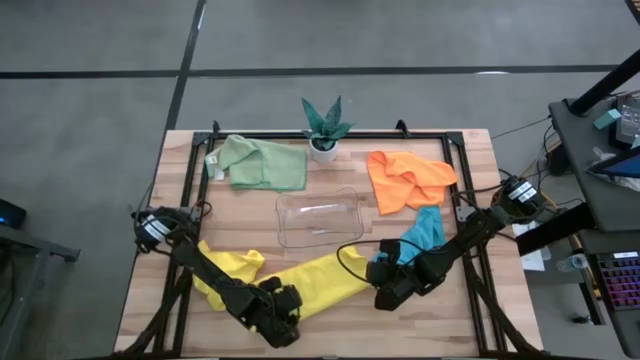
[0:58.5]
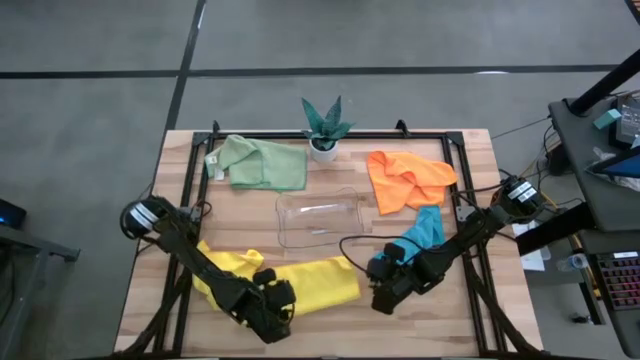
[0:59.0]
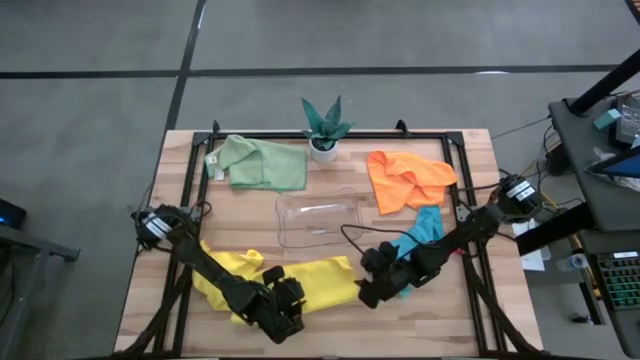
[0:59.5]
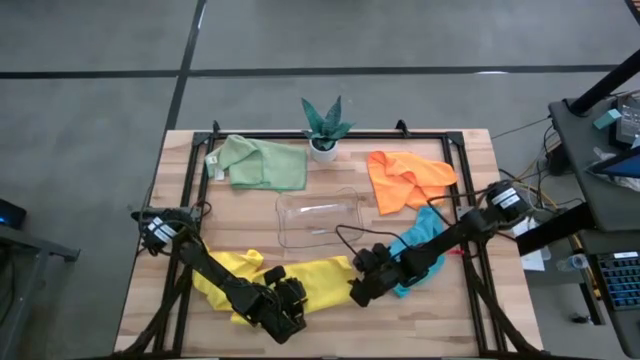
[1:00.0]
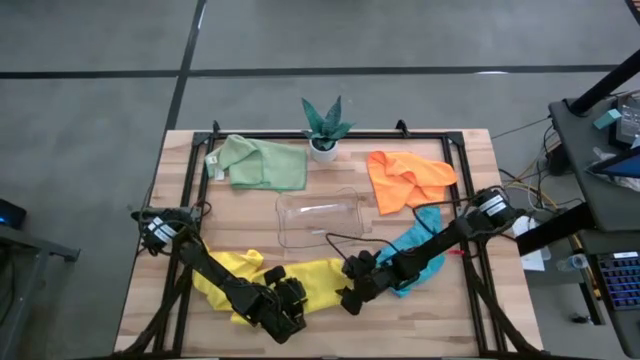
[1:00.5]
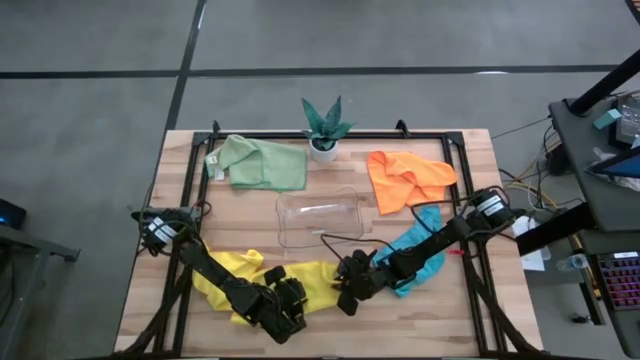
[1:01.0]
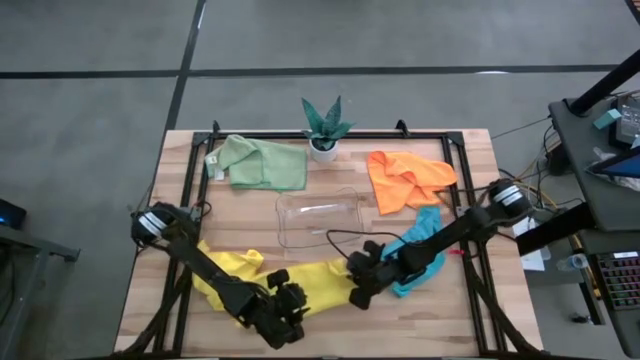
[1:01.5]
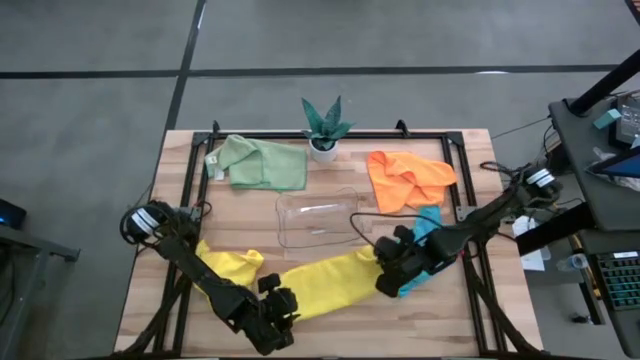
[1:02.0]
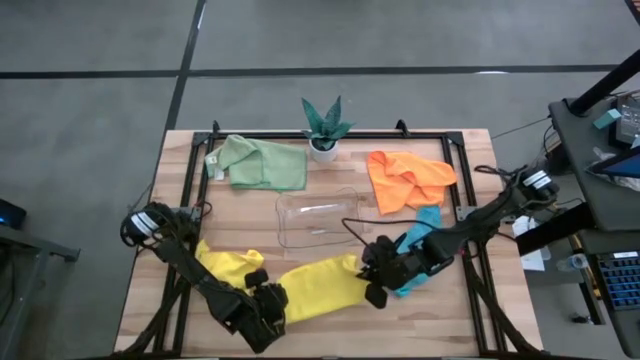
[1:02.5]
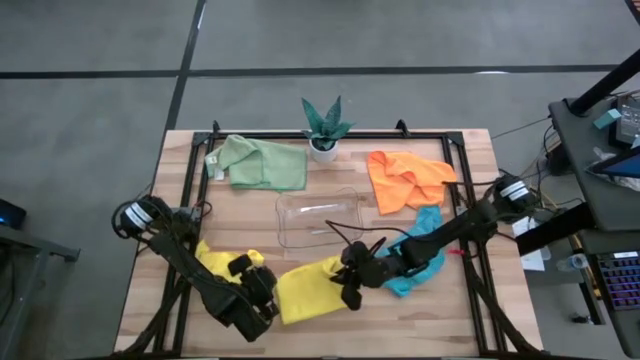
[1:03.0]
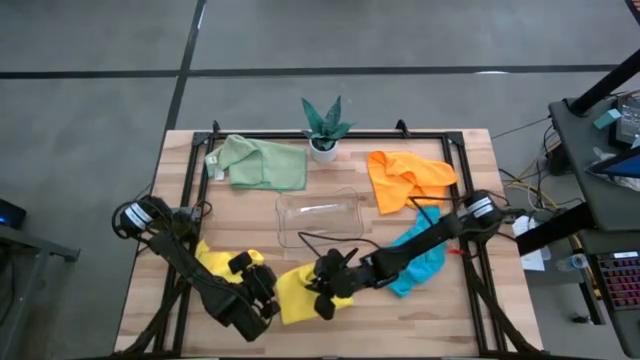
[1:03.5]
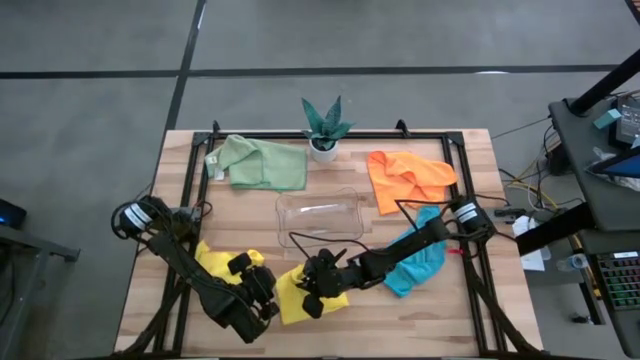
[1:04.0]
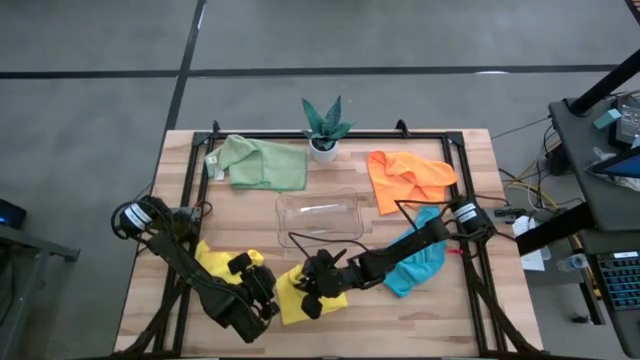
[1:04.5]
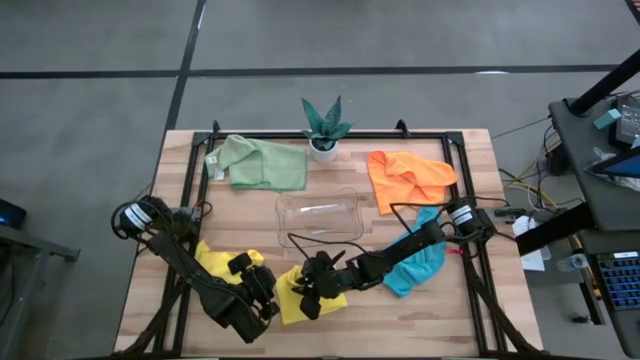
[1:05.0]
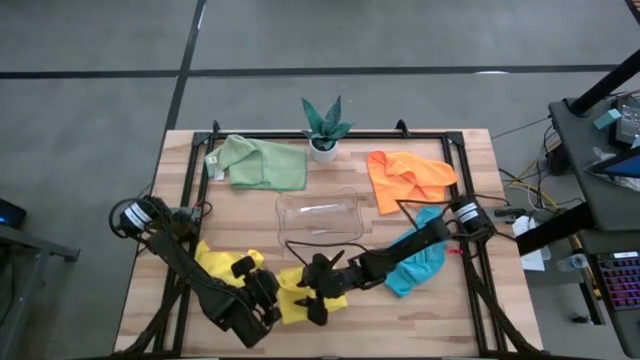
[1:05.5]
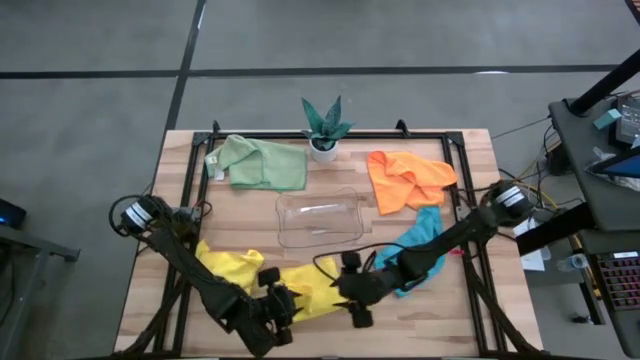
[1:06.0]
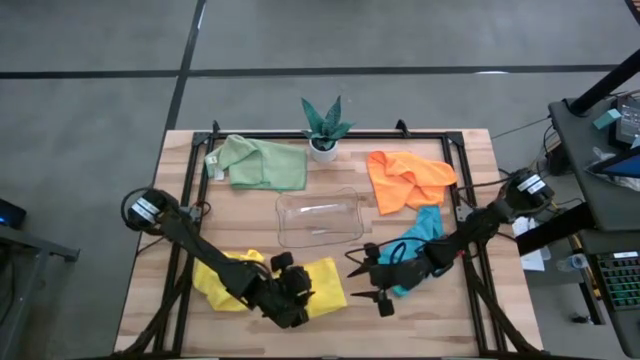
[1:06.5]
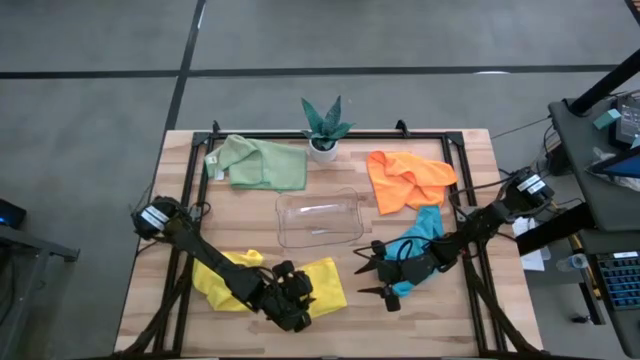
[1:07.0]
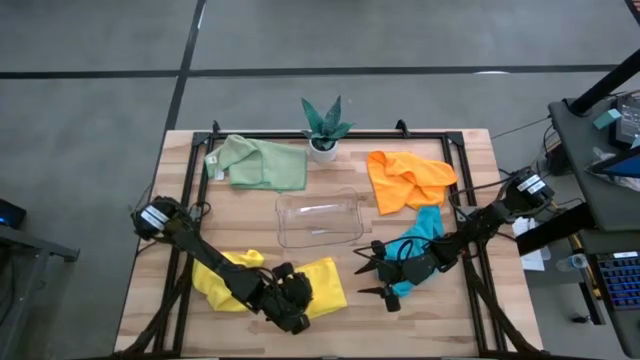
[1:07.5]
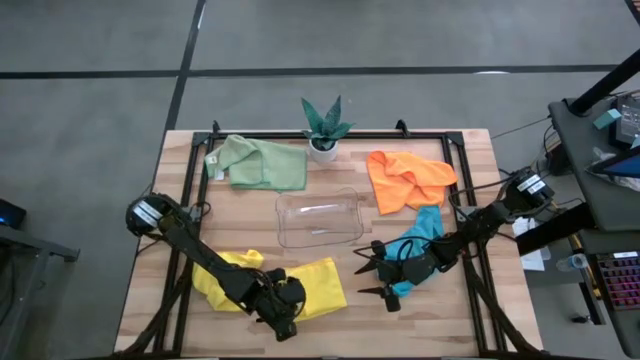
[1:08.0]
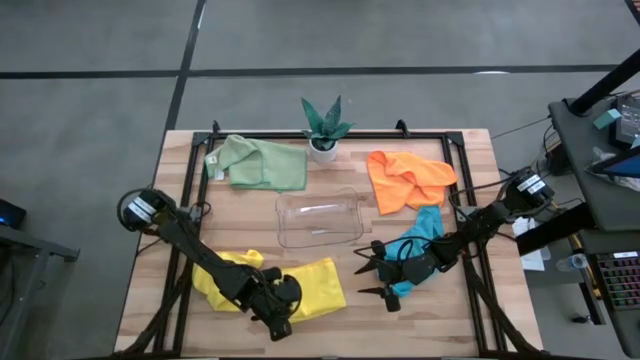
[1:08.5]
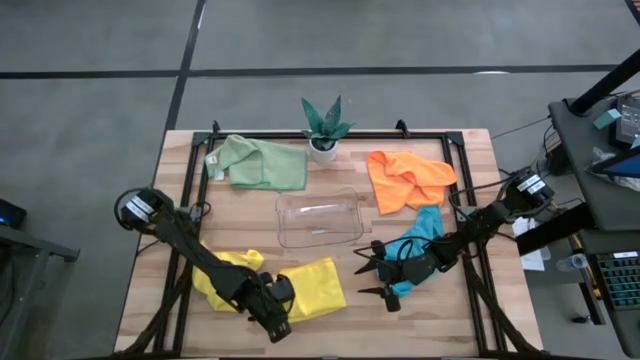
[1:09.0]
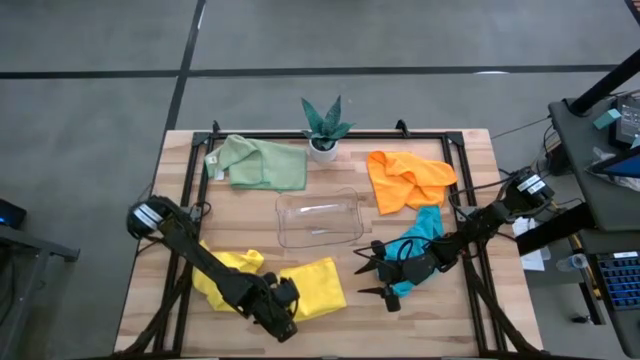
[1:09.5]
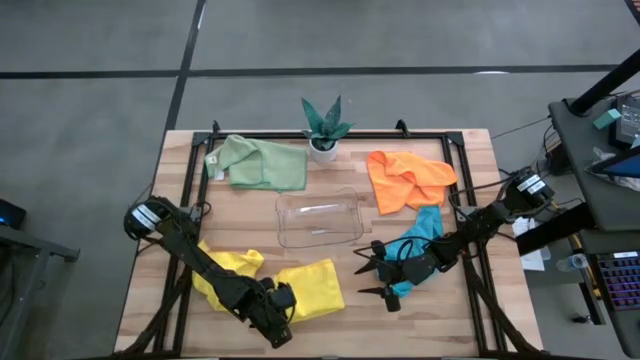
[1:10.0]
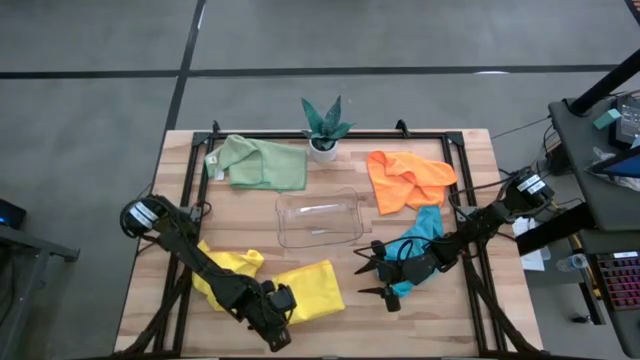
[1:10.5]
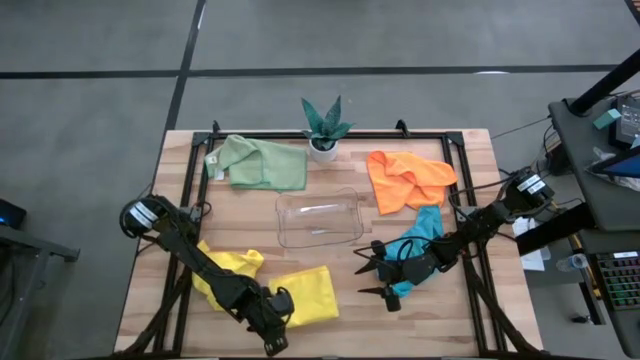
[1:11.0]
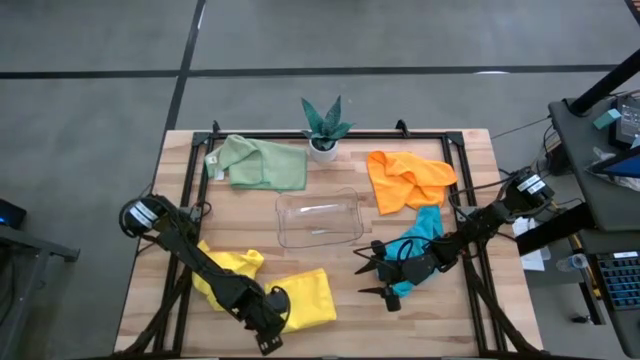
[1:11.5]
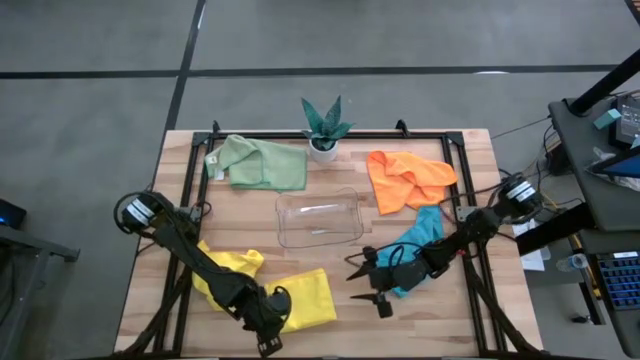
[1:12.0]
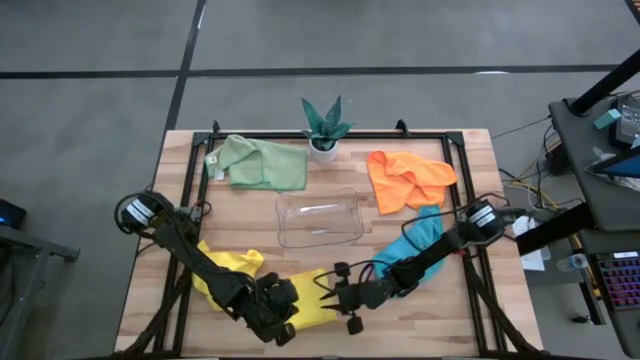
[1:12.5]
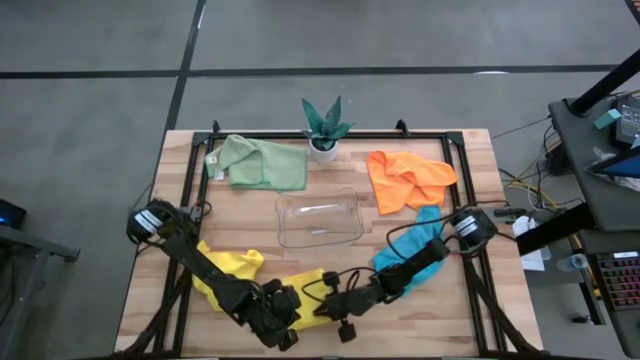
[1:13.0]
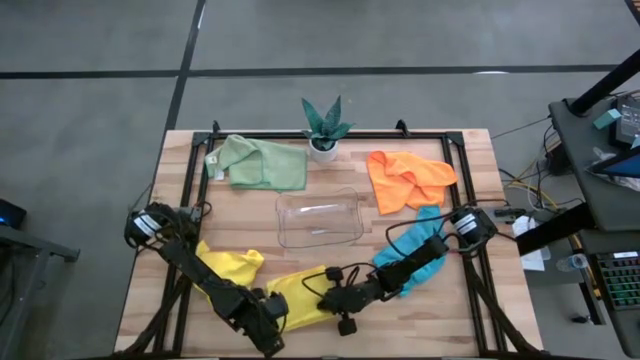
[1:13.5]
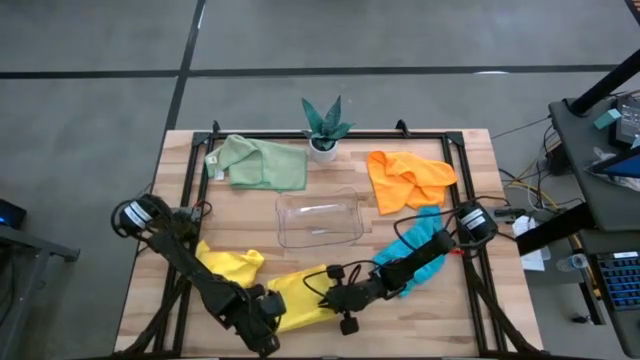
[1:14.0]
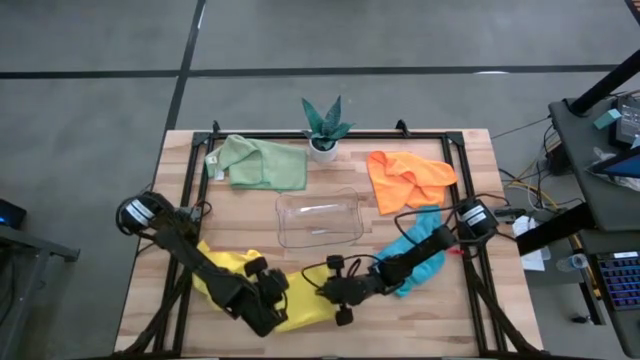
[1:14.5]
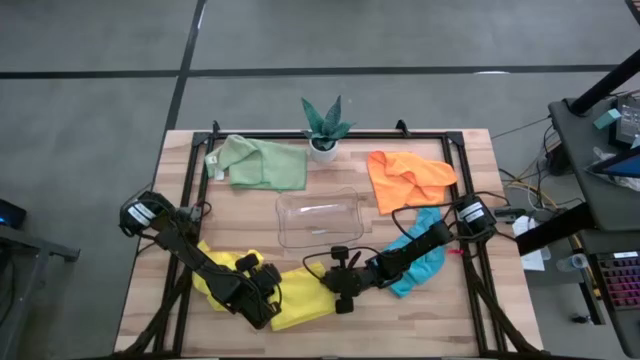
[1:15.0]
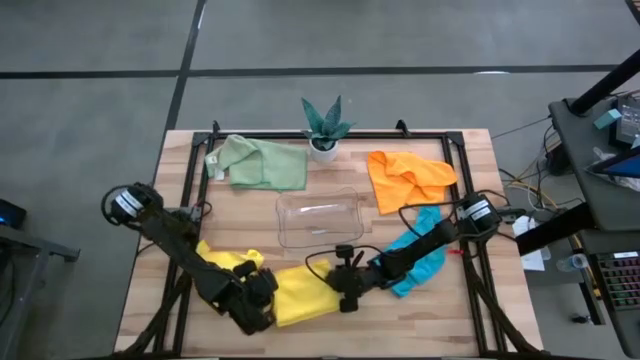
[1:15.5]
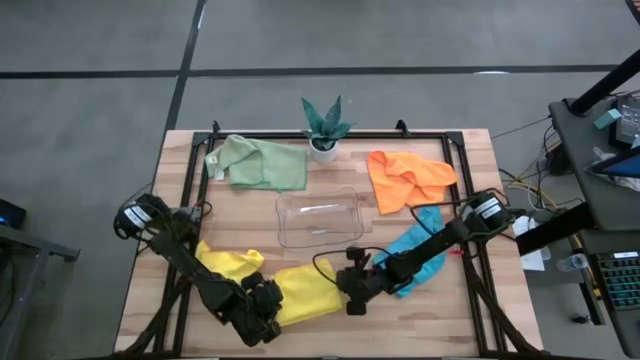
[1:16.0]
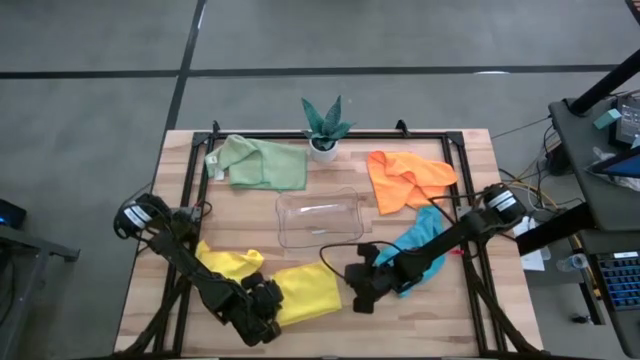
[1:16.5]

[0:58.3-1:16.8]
Task: Fold microfiber towels
Fold the right yellow microfiber towel
